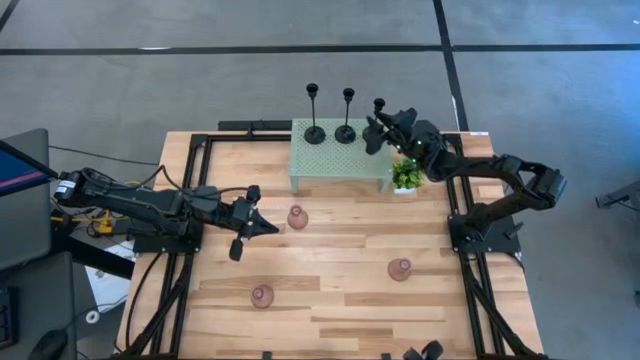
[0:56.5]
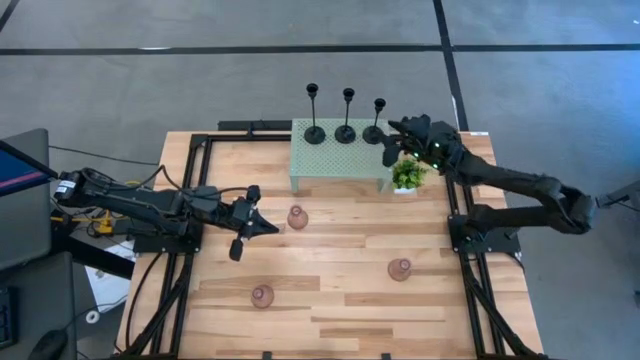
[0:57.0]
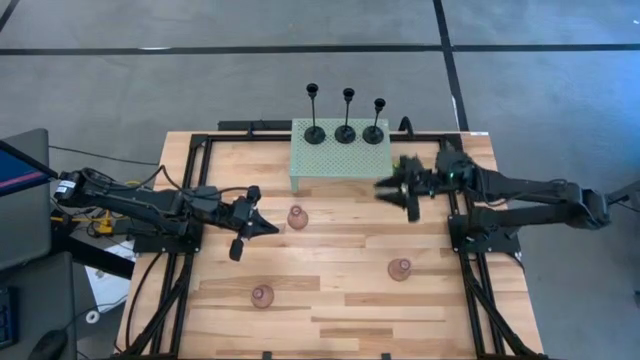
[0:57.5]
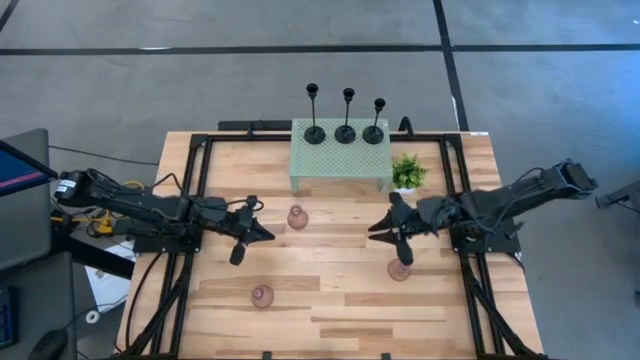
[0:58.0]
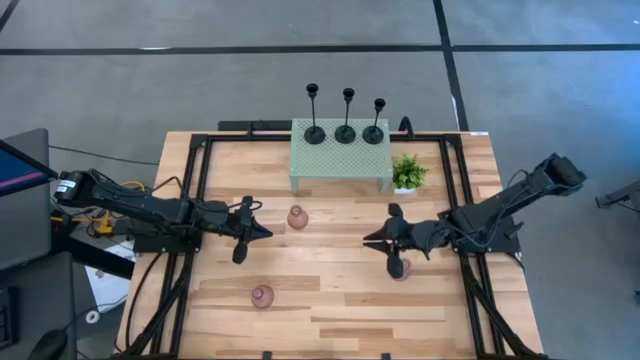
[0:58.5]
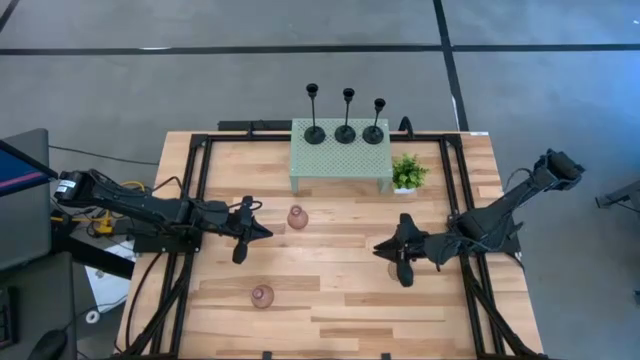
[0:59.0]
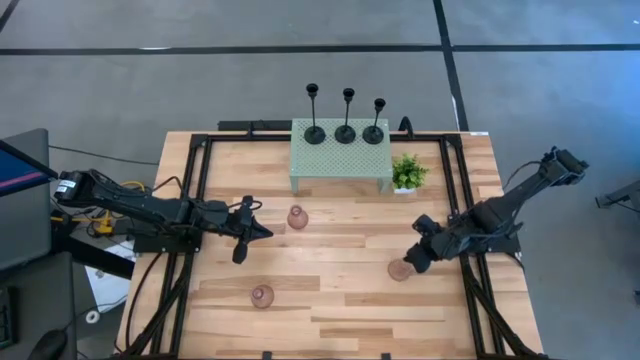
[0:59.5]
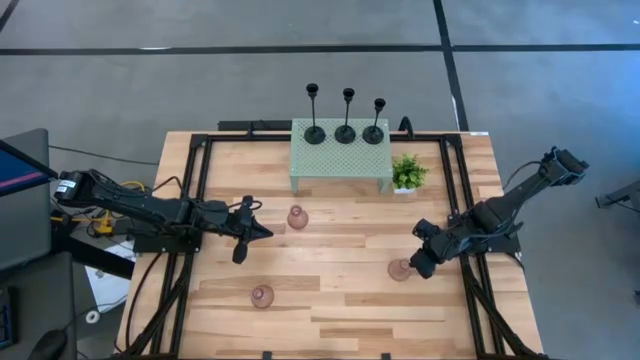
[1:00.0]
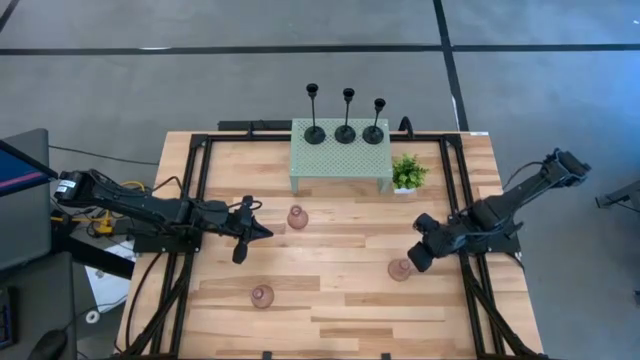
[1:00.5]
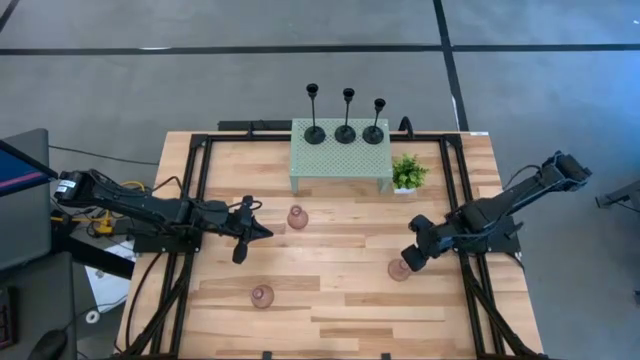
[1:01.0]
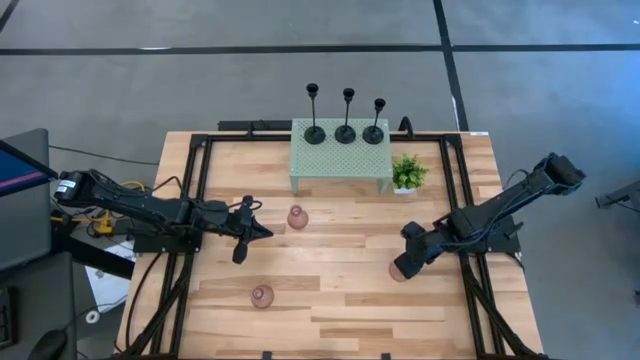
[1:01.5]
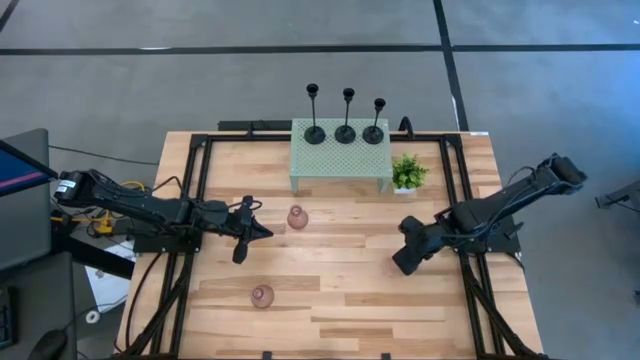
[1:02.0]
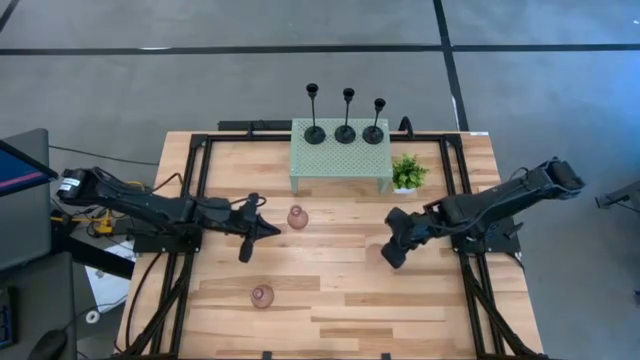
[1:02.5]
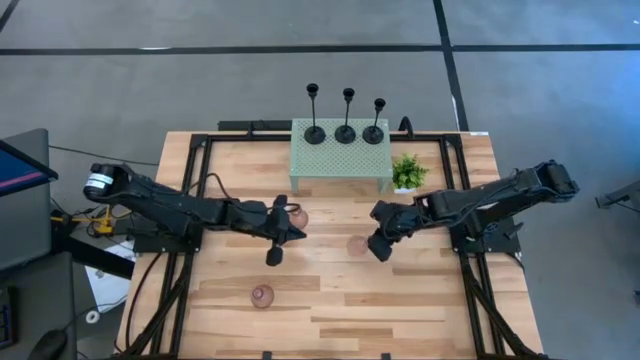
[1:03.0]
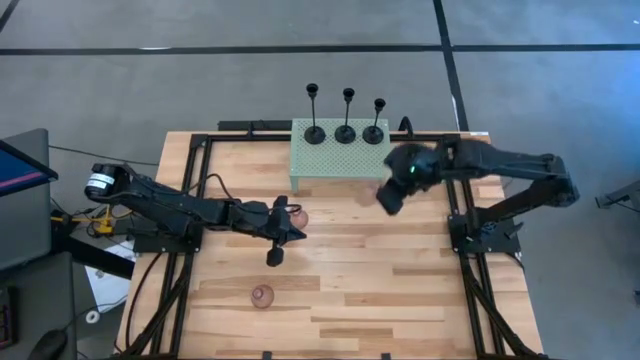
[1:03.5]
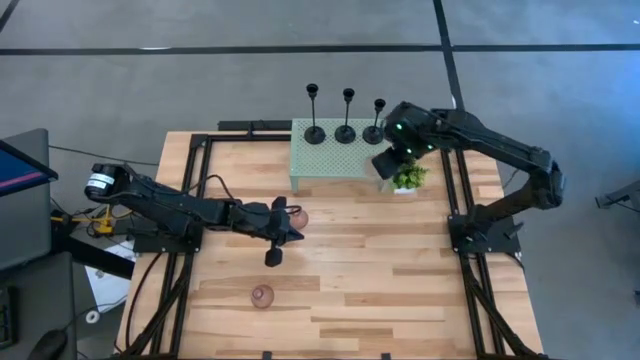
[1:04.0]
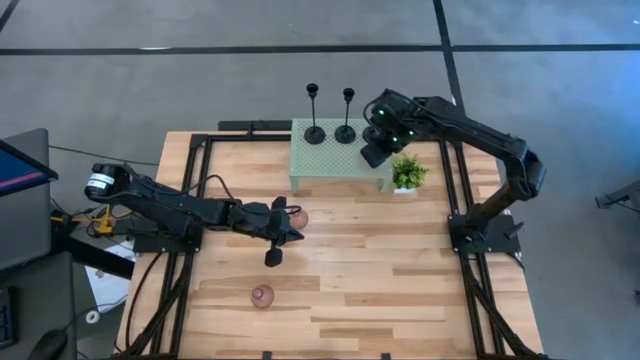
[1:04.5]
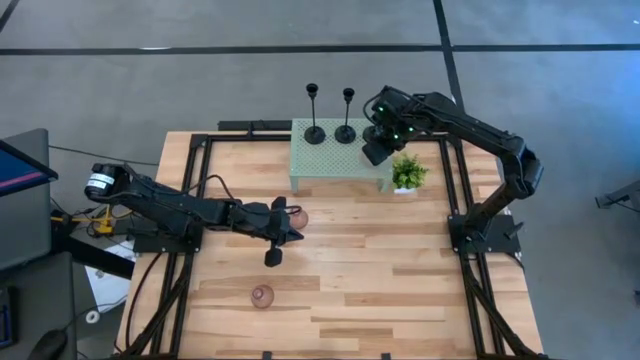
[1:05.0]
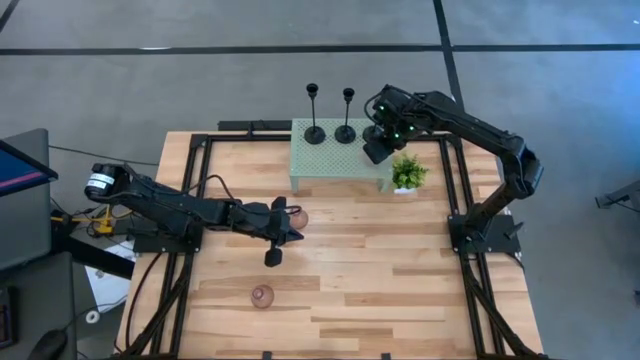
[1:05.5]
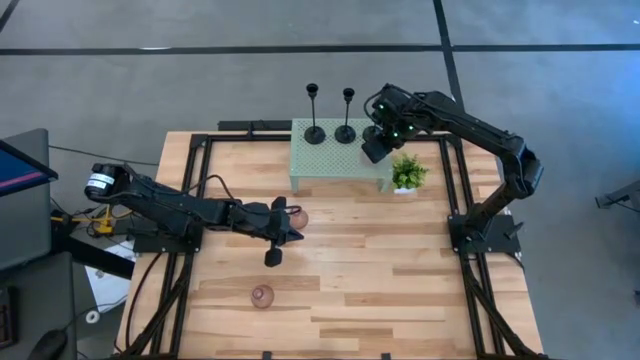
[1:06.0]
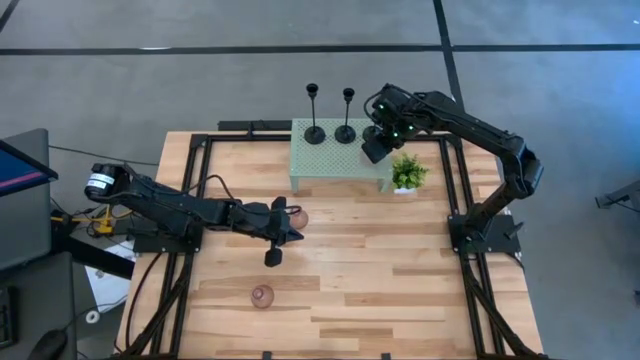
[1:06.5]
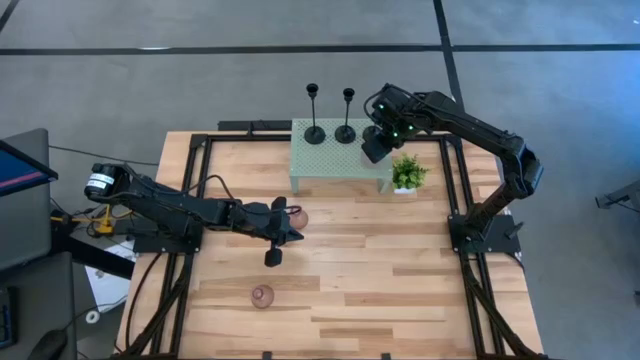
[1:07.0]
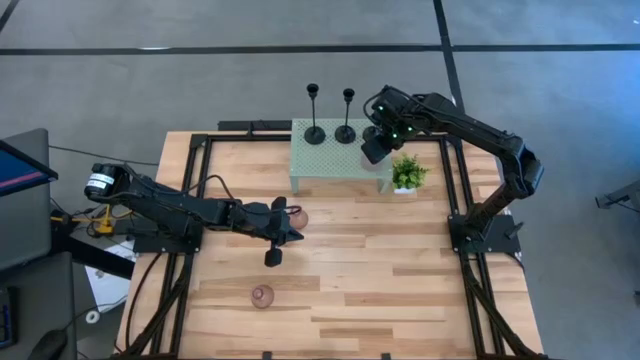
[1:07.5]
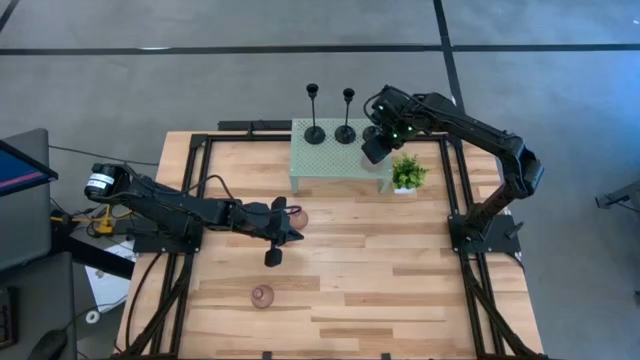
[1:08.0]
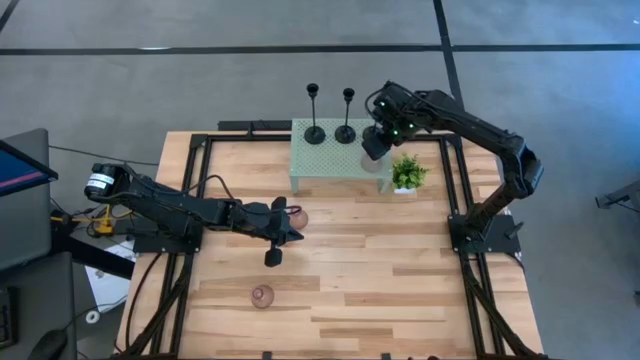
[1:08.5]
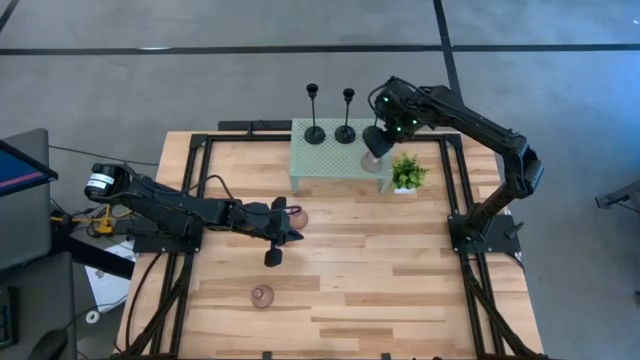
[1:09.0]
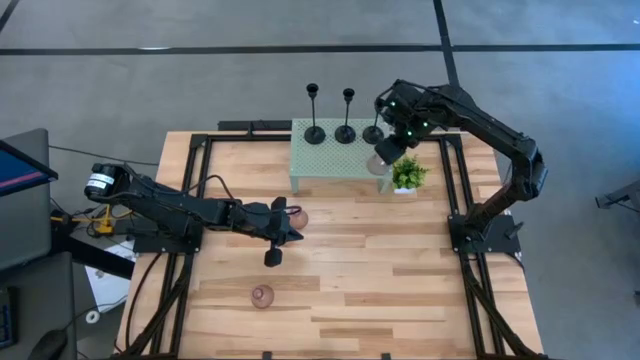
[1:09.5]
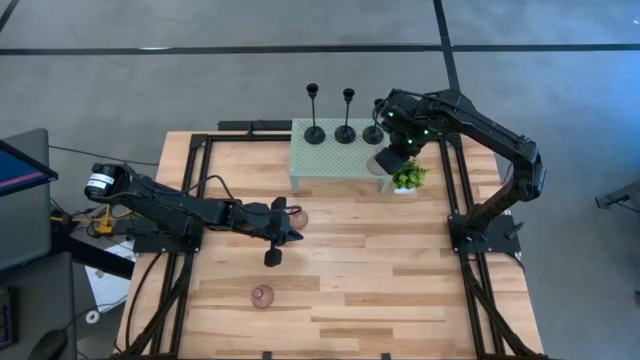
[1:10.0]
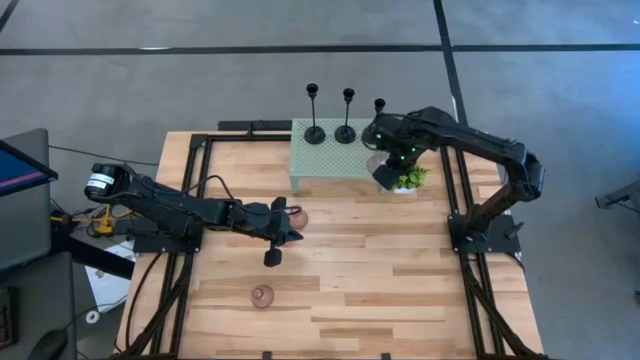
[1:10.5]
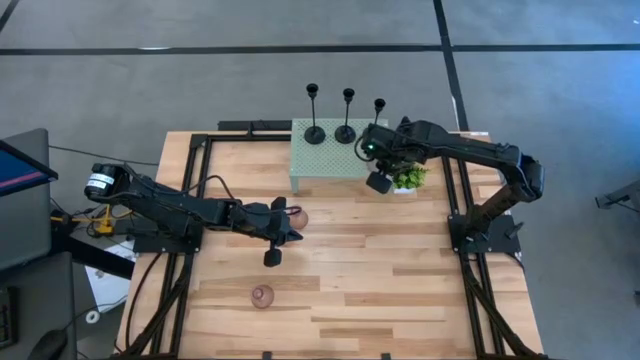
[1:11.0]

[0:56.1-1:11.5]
Task: Pick & Place candle stick holders
Put the middle red candle holder on the shelf
